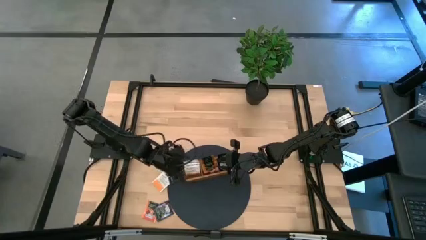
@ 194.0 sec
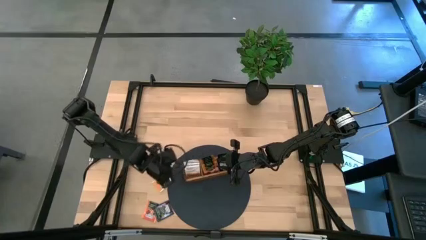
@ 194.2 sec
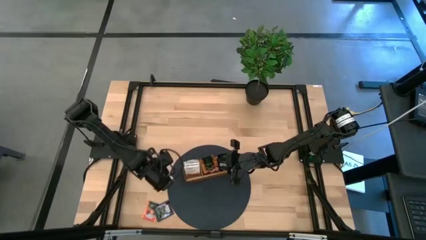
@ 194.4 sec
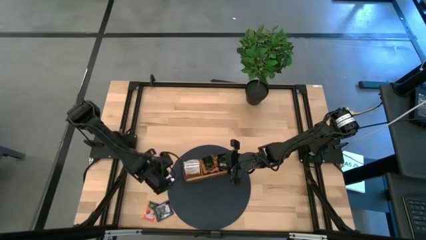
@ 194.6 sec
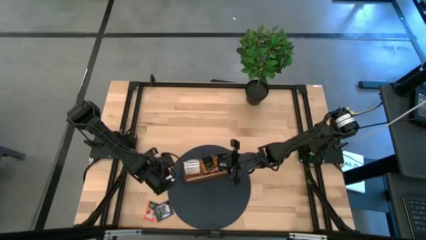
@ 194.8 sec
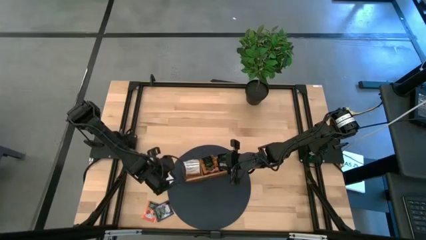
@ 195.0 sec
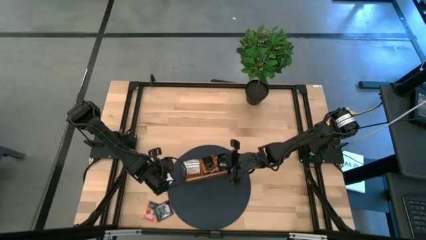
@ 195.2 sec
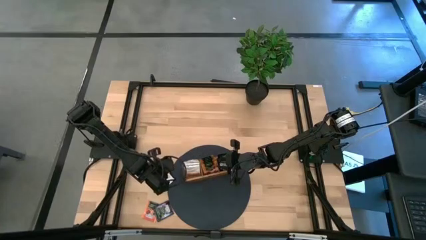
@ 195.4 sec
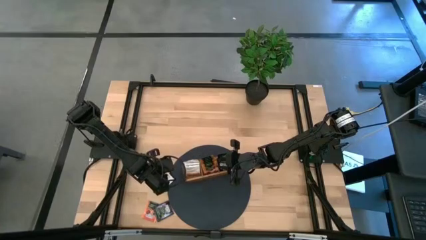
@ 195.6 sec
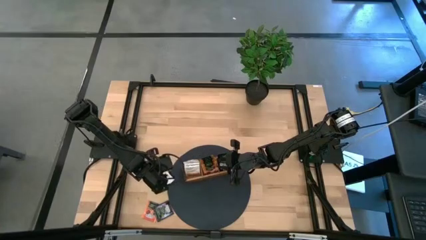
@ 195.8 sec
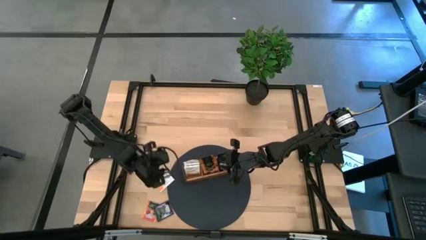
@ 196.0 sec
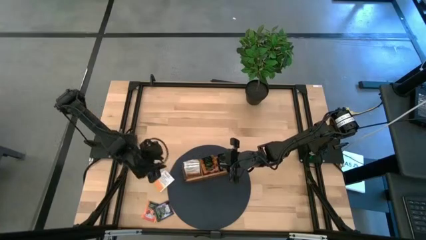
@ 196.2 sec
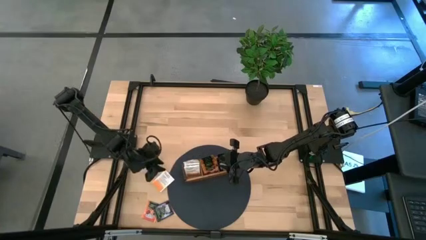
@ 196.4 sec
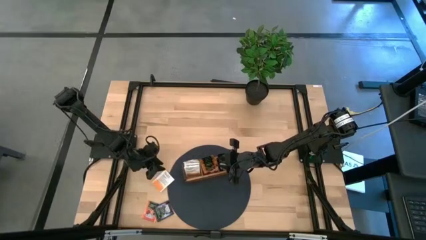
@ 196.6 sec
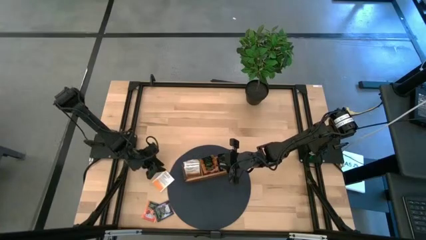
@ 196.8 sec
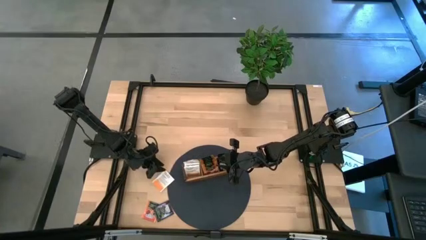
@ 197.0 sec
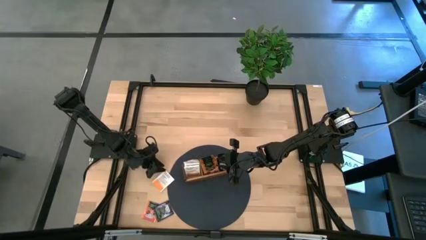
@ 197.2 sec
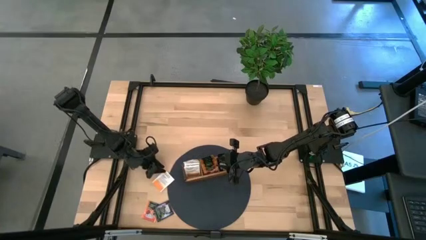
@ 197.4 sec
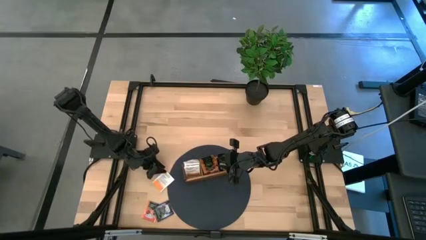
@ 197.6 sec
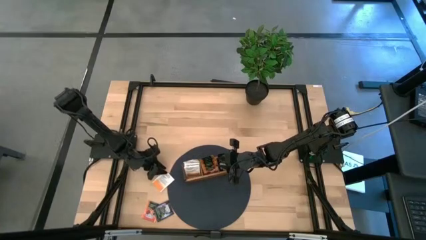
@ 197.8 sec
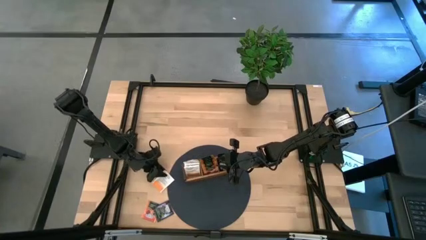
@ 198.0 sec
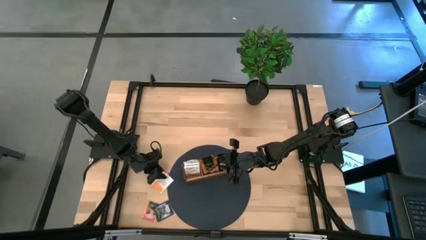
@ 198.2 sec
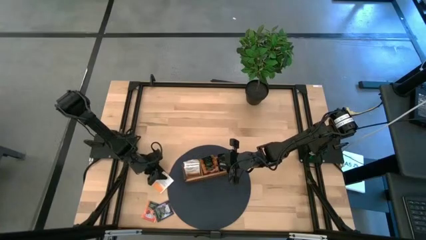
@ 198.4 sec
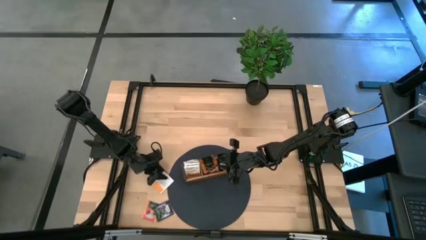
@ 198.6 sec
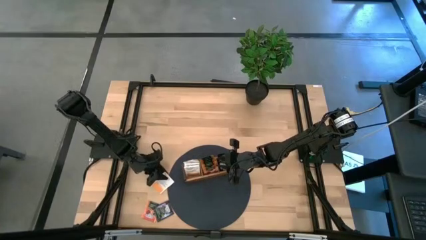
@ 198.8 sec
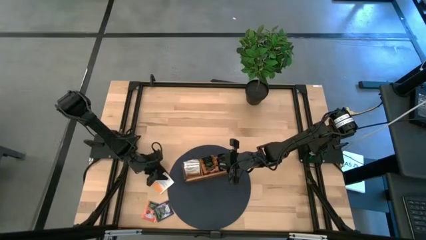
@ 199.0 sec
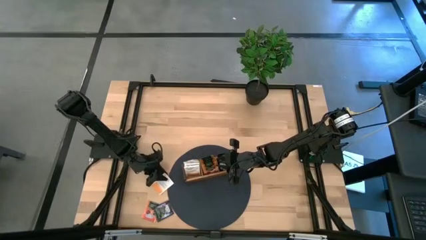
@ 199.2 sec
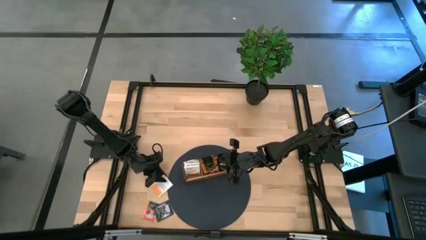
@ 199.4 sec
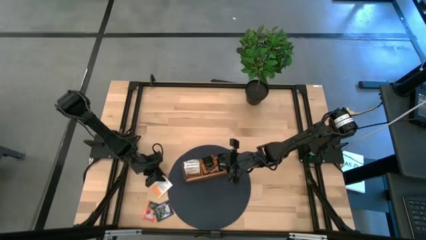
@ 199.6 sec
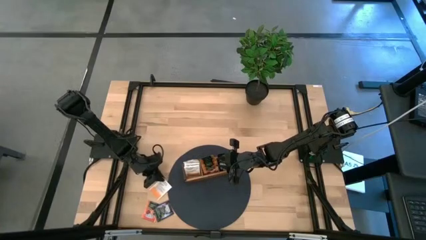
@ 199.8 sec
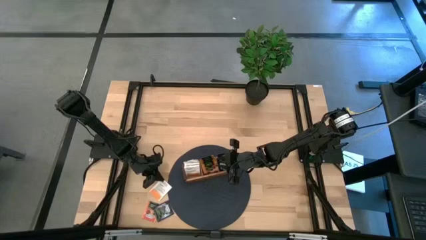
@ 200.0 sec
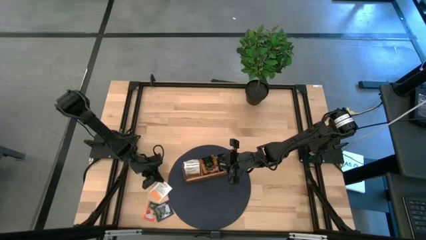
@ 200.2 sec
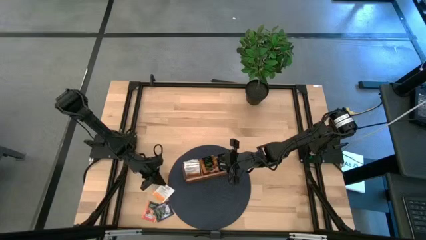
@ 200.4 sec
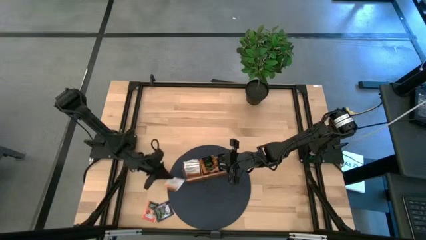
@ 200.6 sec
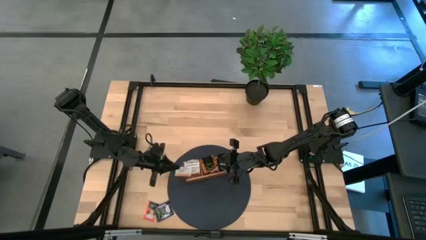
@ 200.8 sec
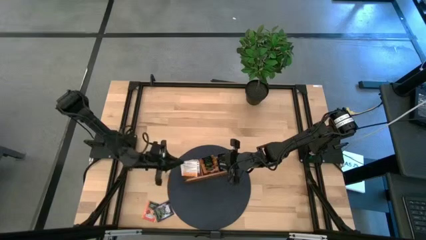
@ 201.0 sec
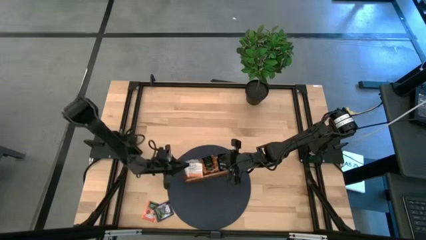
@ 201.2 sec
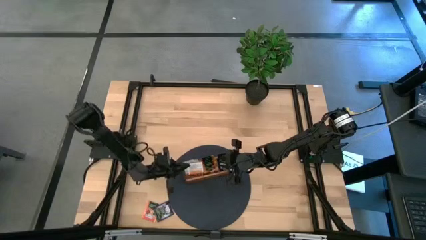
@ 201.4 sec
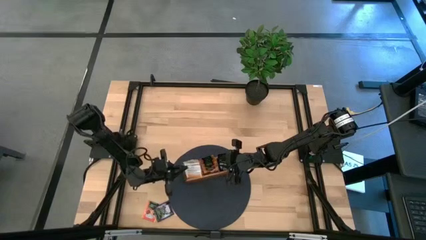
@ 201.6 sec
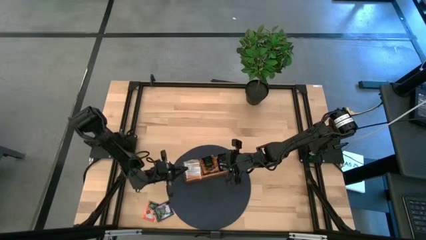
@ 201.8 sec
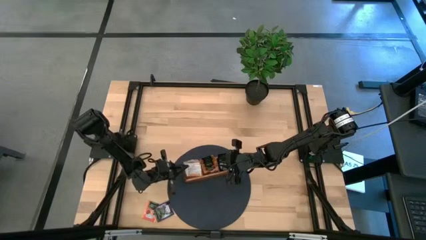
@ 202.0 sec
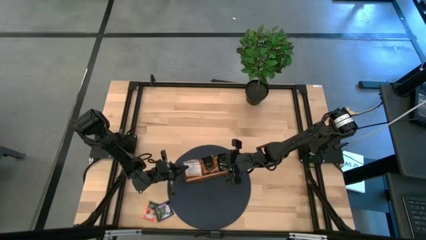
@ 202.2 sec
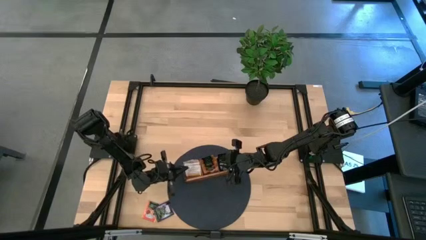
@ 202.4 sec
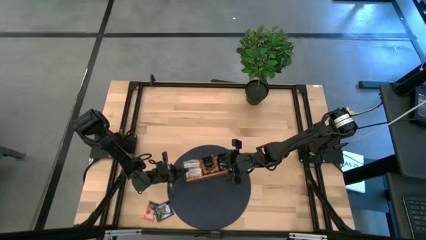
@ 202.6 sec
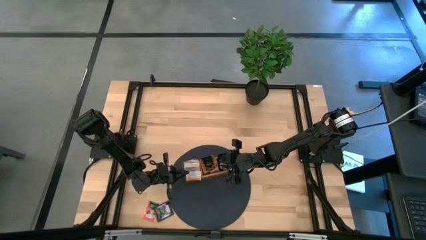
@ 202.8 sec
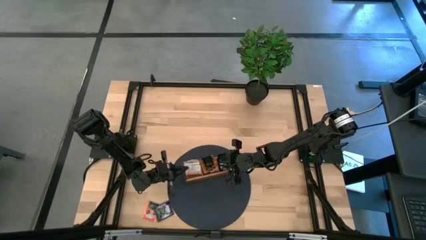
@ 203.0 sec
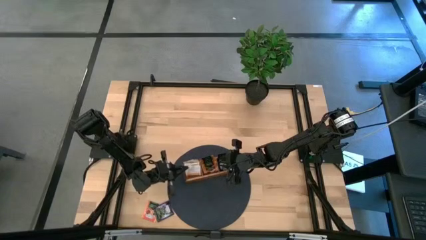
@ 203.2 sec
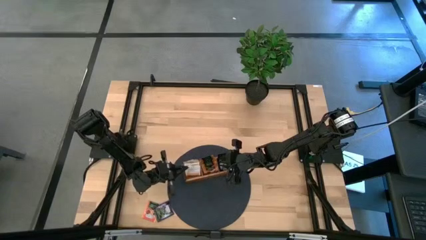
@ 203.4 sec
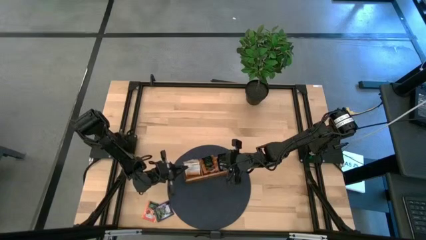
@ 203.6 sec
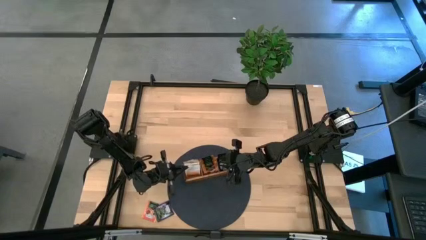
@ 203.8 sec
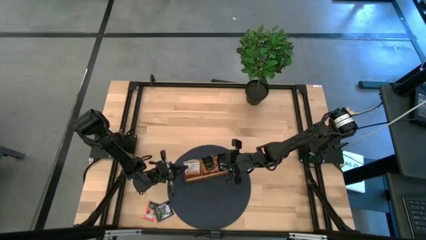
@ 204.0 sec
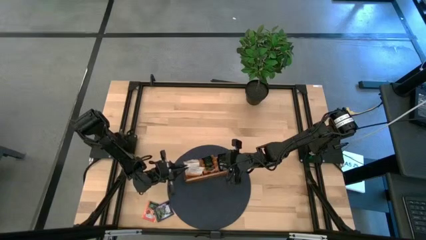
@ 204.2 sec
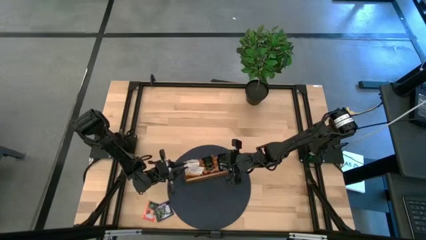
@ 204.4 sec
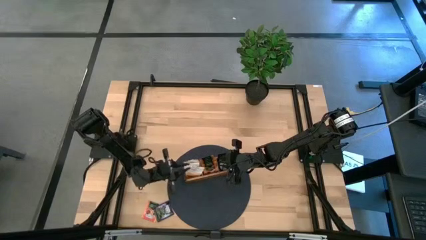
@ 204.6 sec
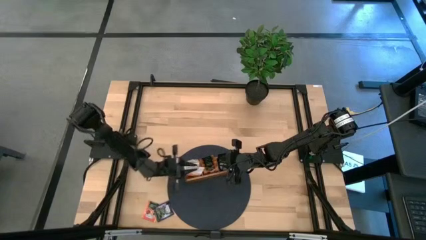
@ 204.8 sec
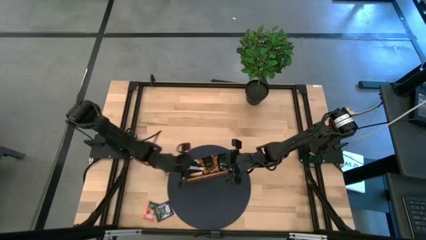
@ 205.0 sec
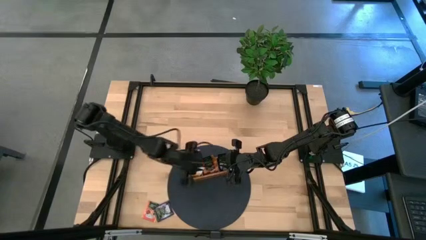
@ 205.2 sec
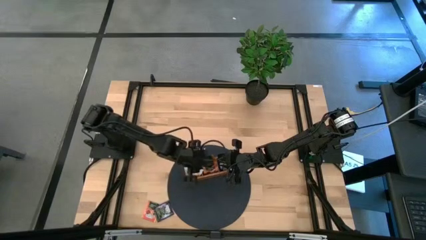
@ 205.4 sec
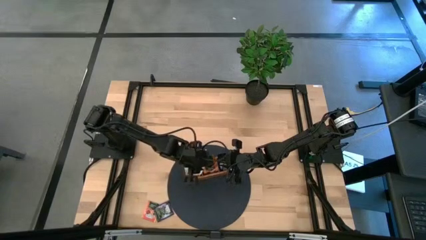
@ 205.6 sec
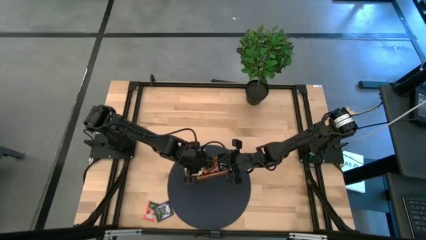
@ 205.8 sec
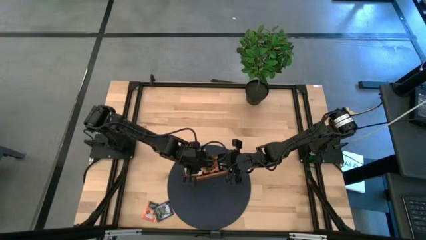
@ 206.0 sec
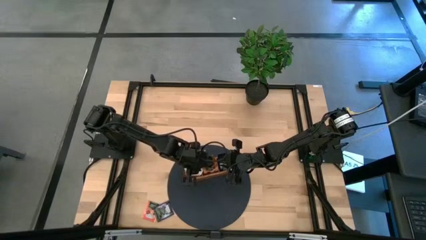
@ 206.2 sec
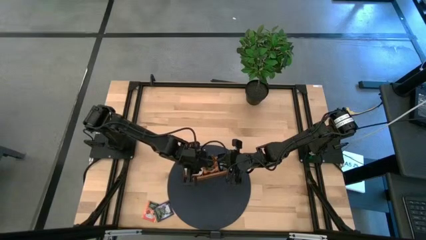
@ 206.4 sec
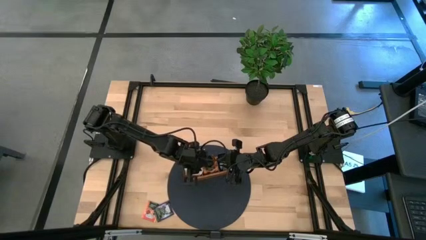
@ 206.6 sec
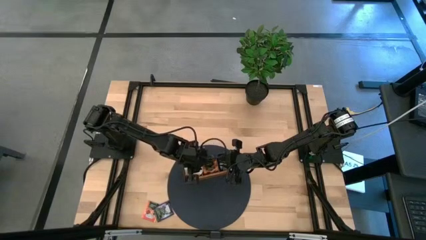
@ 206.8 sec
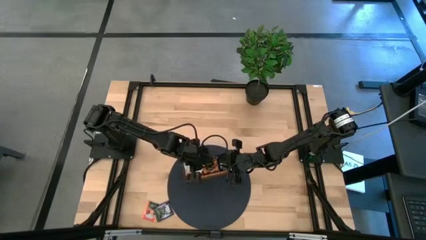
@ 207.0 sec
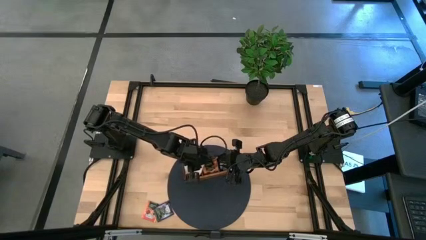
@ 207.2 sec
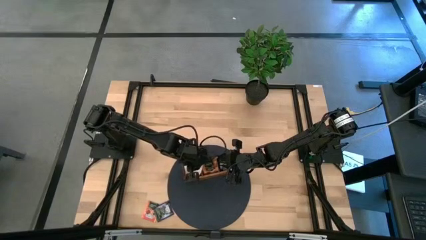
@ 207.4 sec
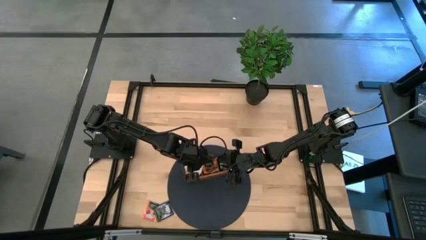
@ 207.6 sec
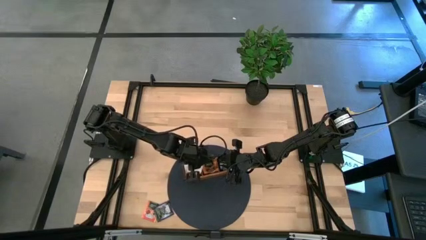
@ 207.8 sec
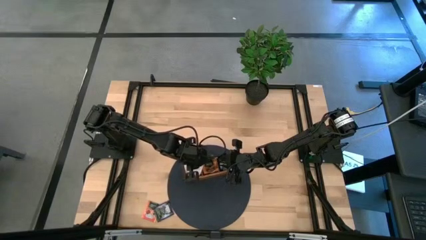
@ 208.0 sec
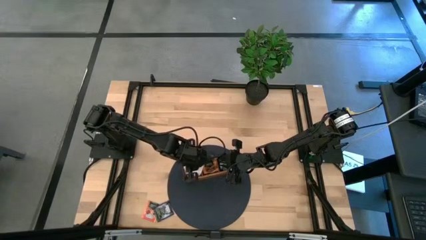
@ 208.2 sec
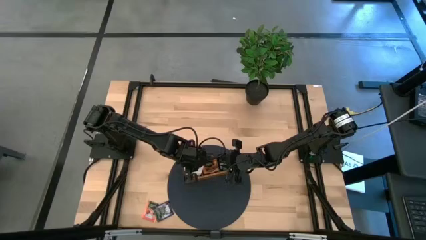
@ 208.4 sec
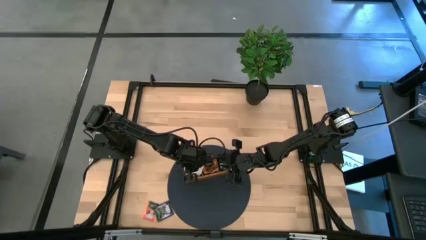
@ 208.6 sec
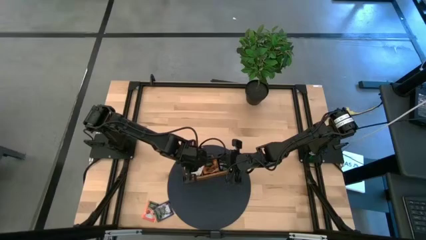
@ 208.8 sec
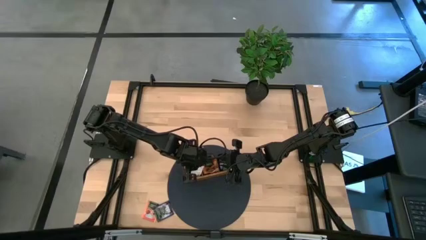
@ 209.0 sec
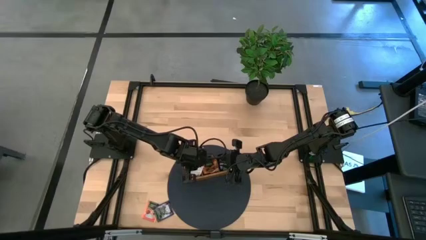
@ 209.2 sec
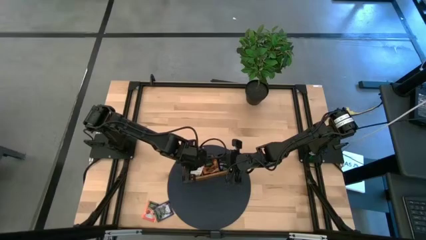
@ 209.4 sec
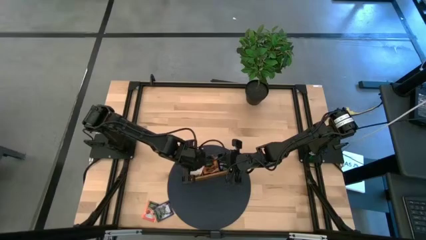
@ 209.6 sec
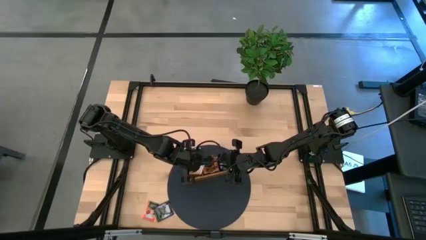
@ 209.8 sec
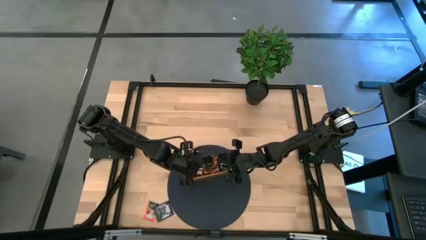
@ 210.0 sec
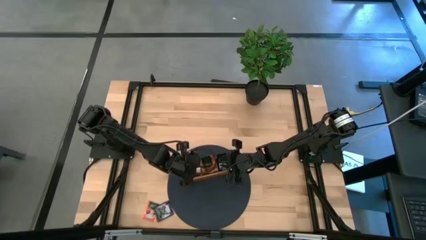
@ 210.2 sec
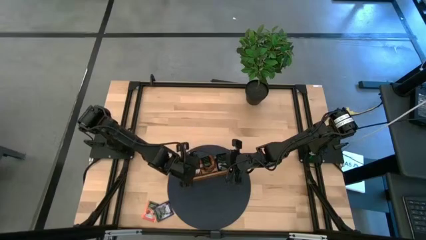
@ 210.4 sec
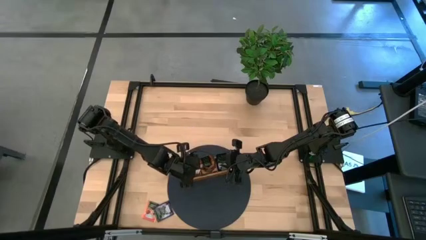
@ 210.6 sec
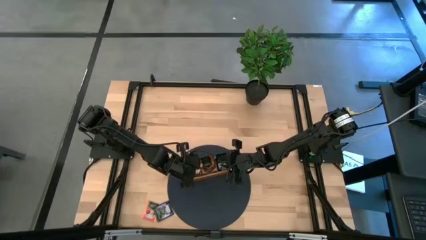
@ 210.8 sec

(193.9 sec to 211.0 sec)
Task: Pick & Place Tea
Put the white orange tea bag into the left section of the wooden organizer
